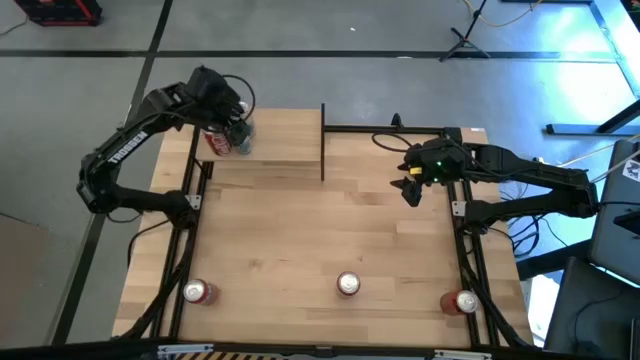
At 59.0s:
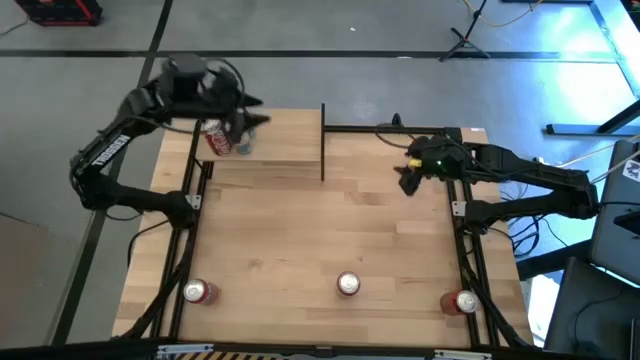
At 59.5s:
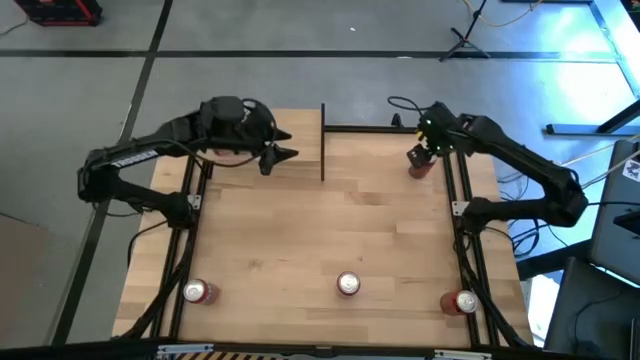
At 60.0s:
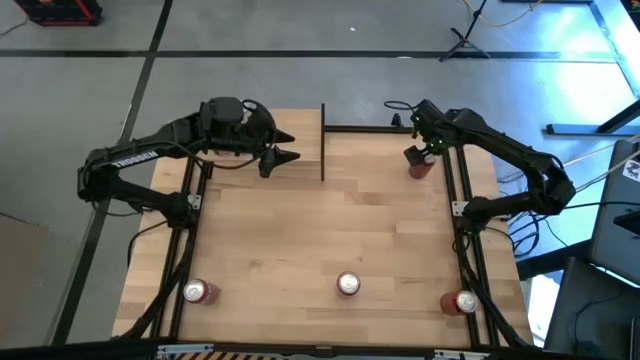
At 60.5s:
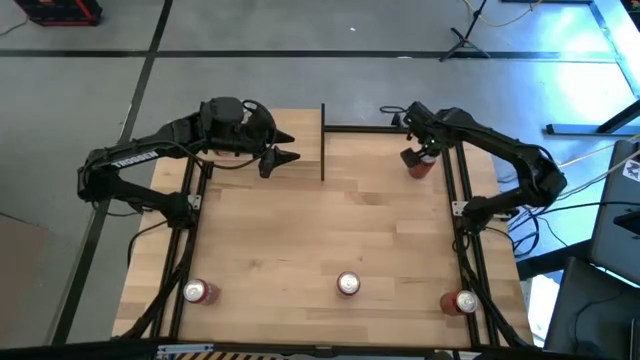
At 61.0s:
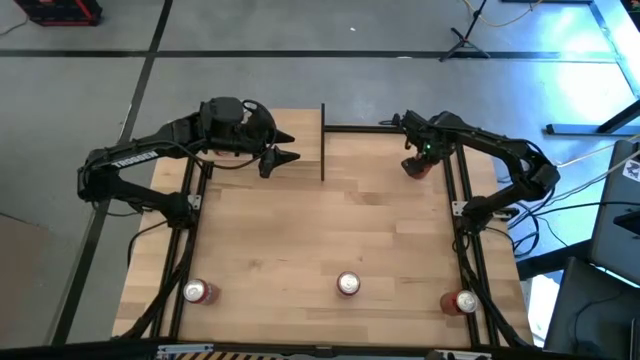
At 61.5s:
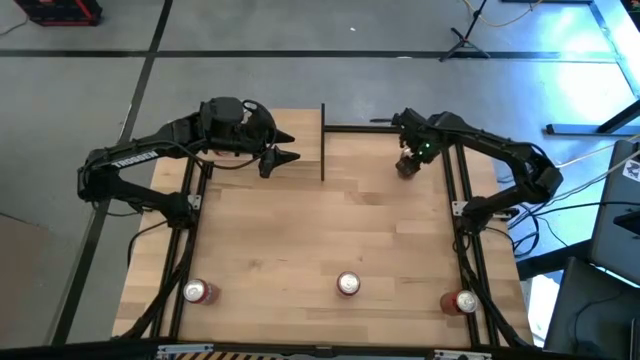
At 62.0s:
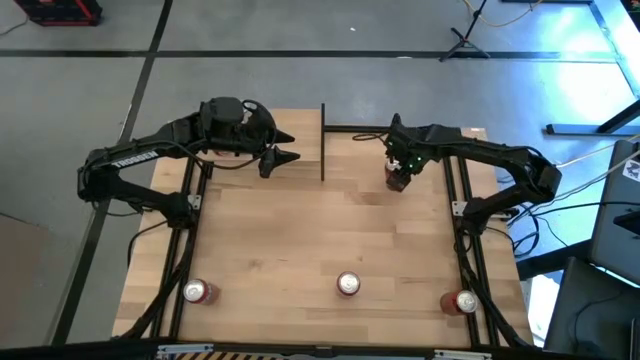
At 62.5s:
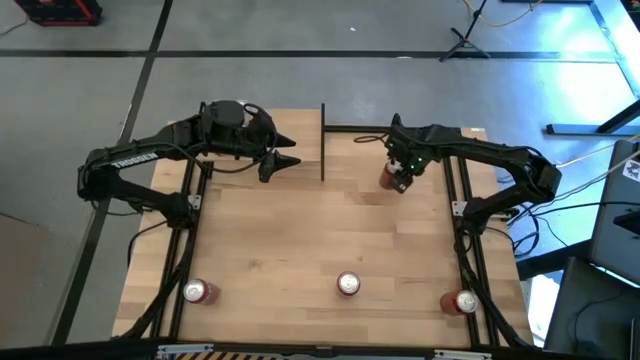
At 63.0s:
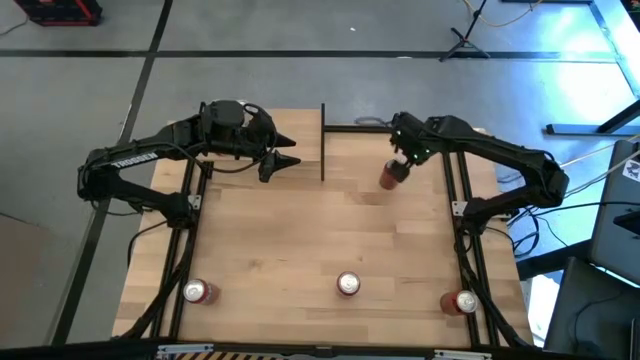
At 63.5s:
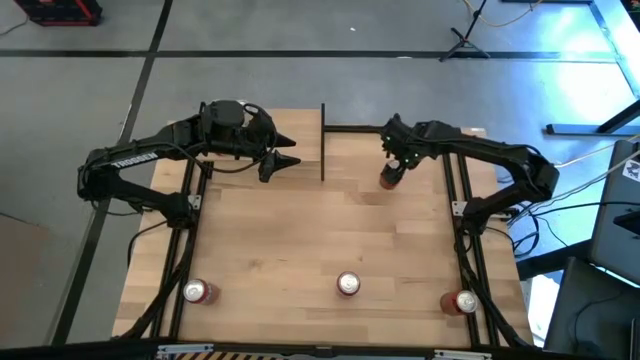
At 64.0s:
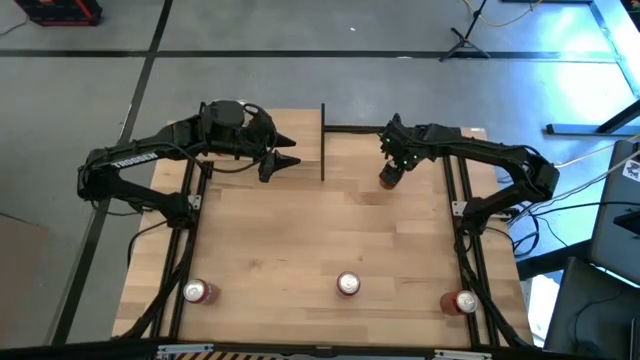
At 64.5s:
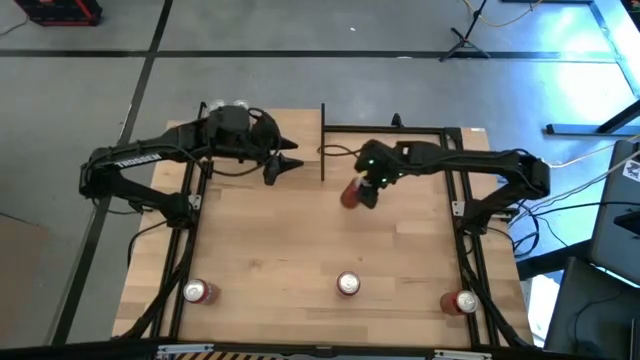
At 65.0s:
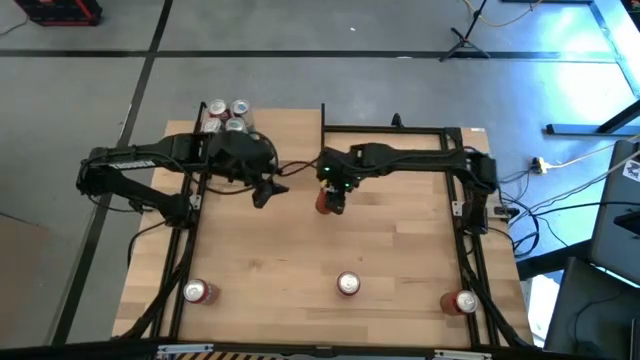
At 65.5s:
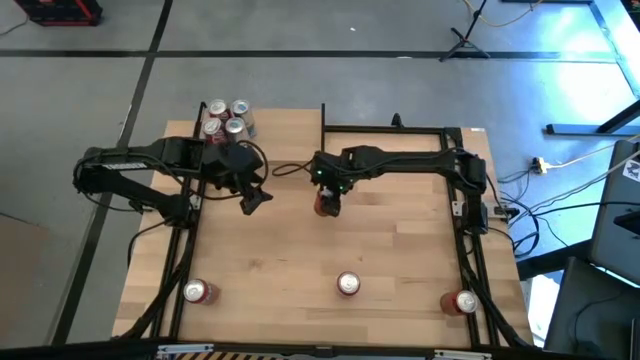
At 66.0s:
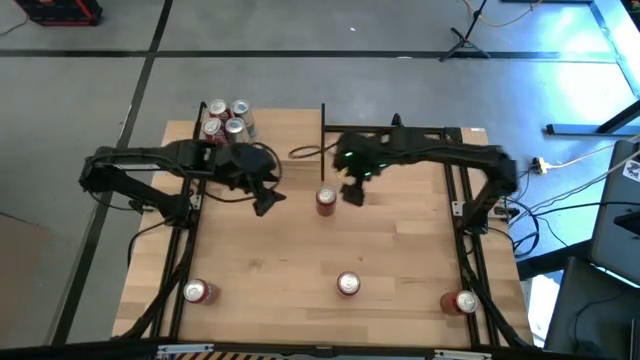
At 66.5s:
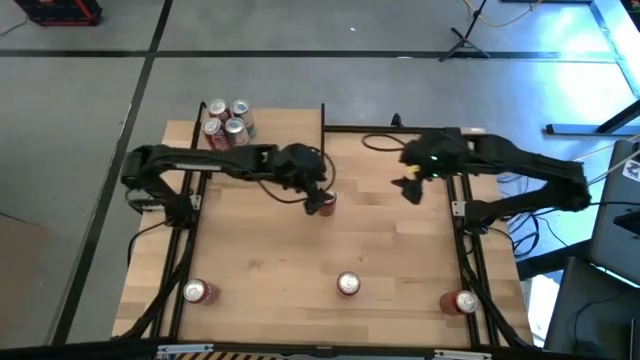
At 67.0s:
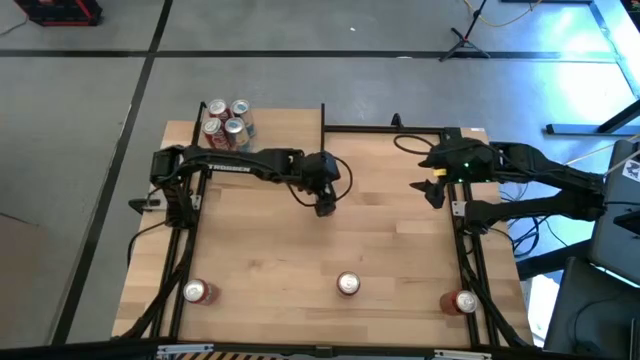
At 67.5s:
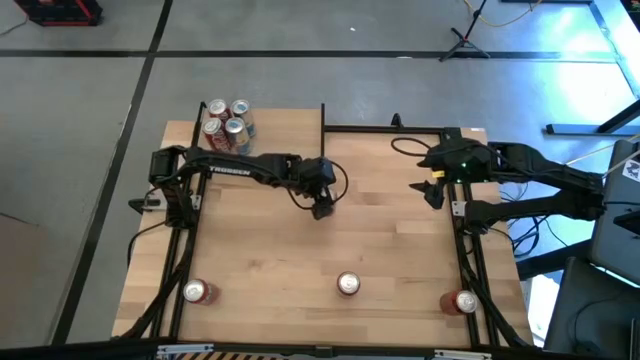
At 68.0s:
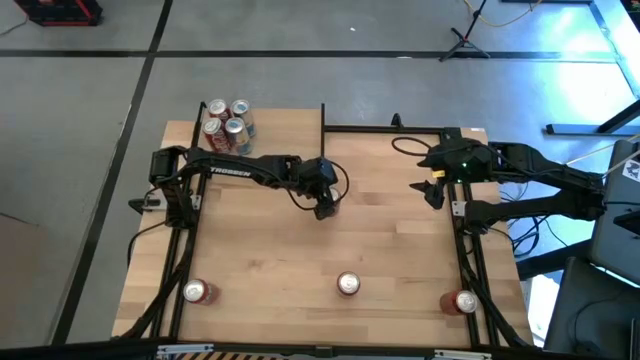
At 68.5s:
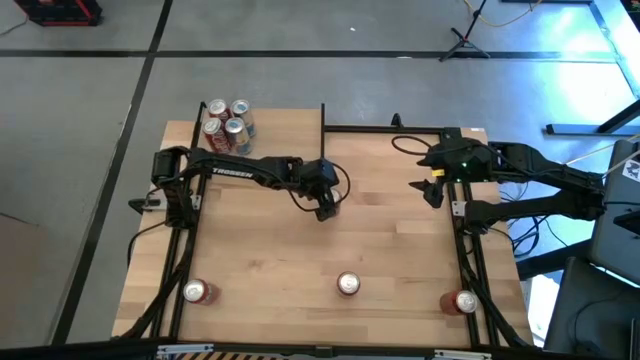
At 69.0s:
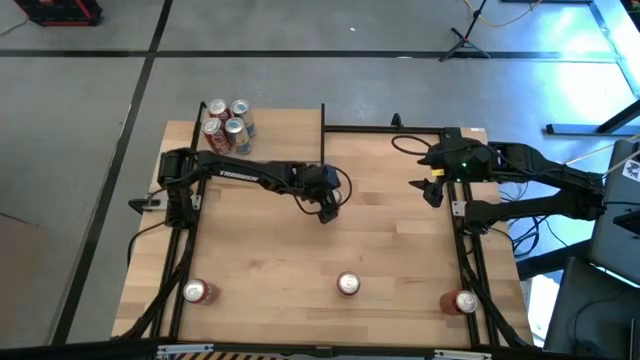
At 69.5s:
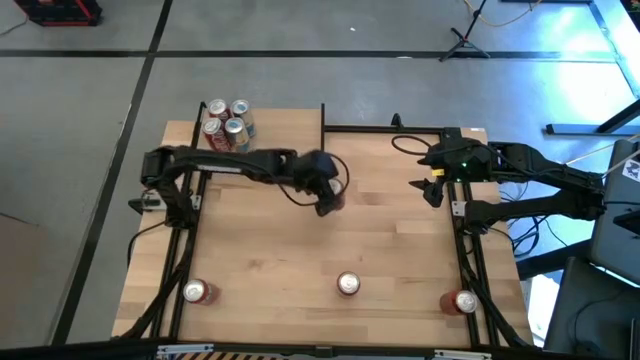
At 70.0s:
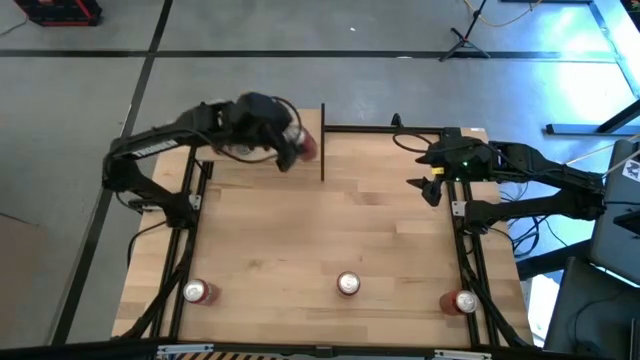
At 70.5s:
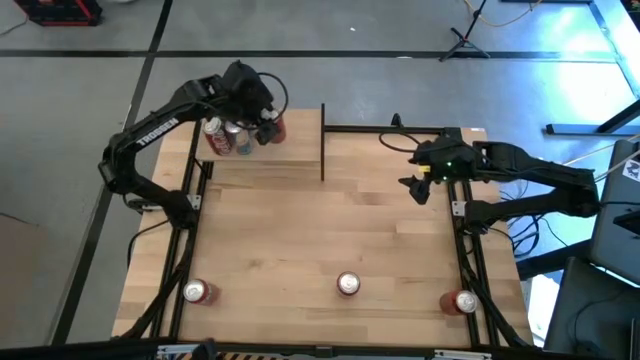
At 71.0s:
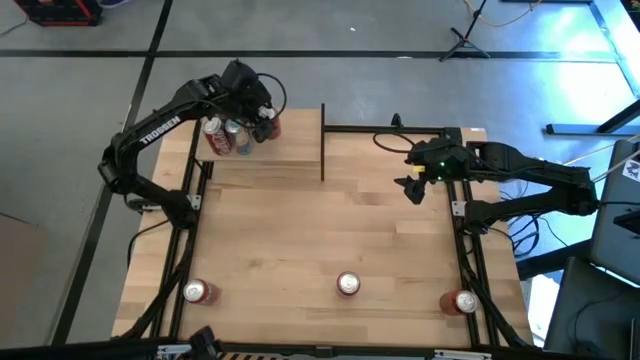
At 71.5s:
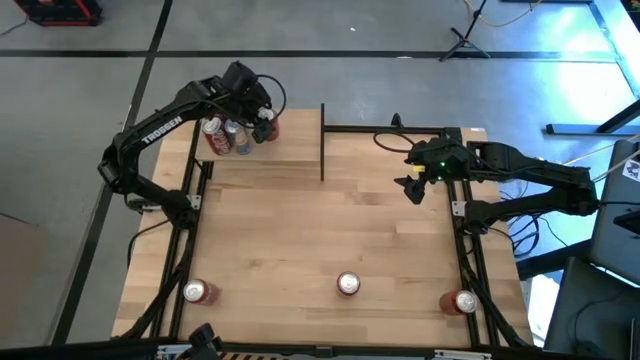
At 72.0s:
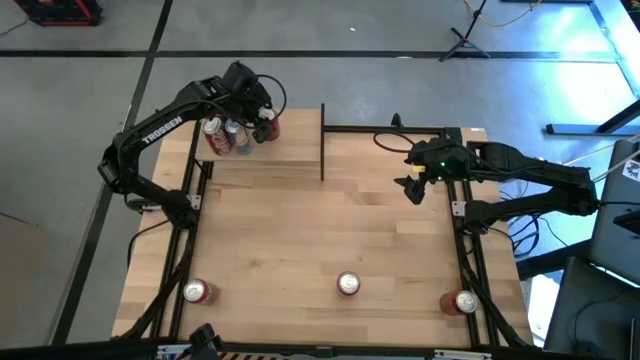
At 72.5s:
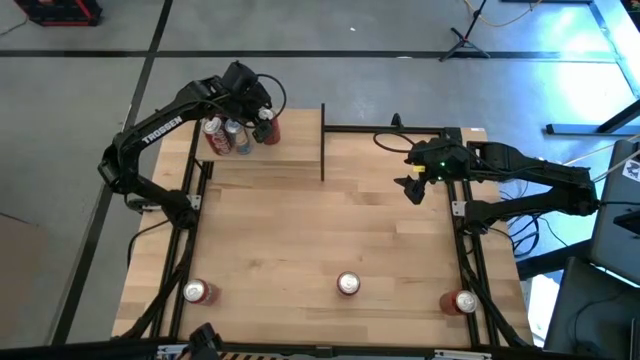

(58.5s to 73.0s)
Task: Place canned beverage on shelf
Put the top red and black soda can on the shelf

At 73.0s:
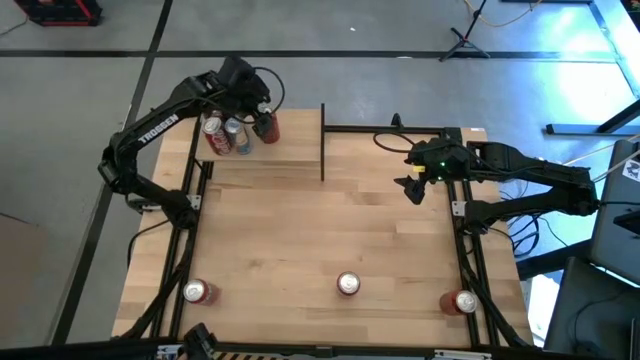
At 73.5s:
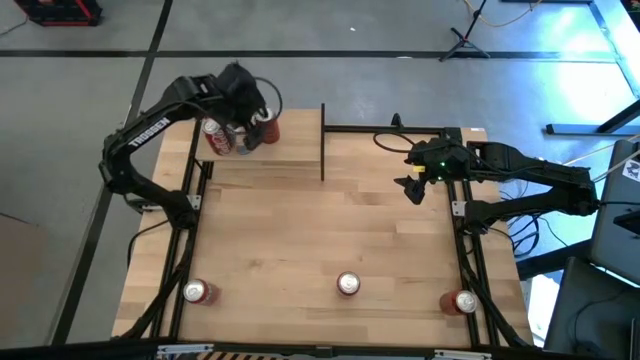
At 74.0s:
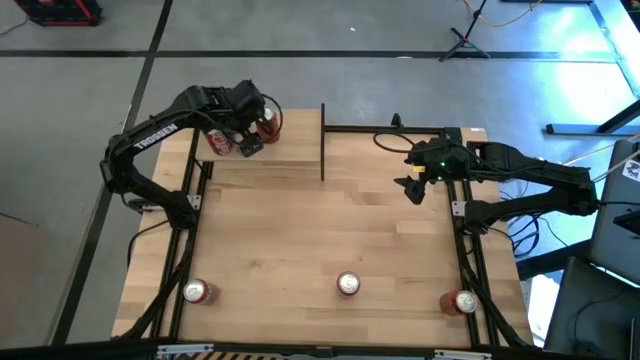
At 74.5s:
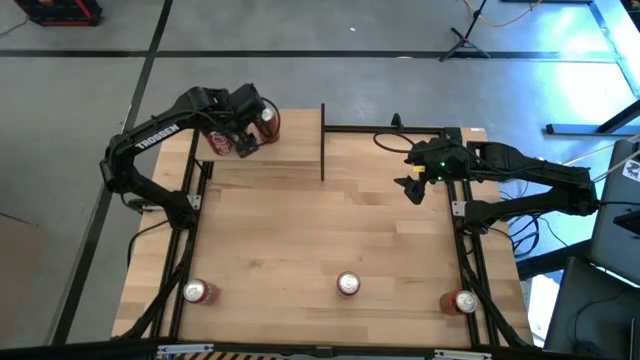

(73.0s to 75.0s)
Adjust the bottom blue soda can

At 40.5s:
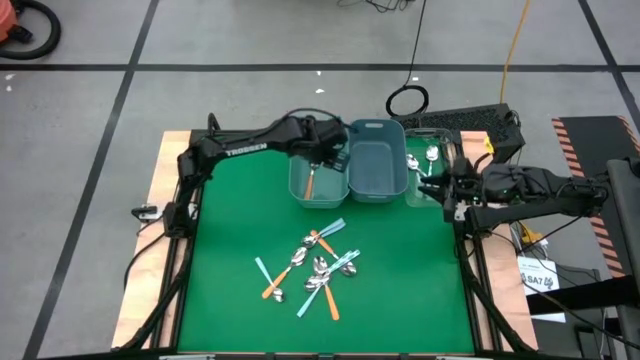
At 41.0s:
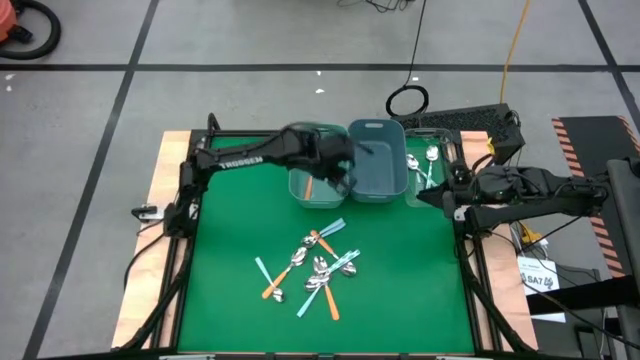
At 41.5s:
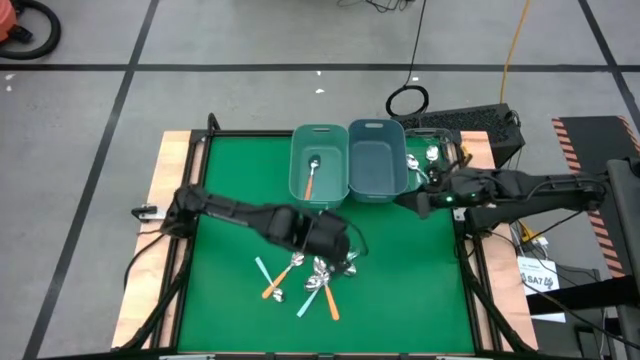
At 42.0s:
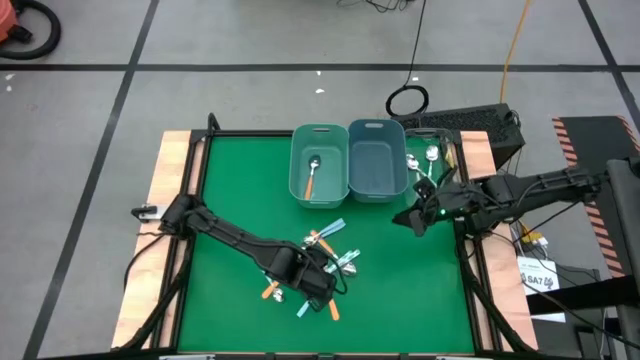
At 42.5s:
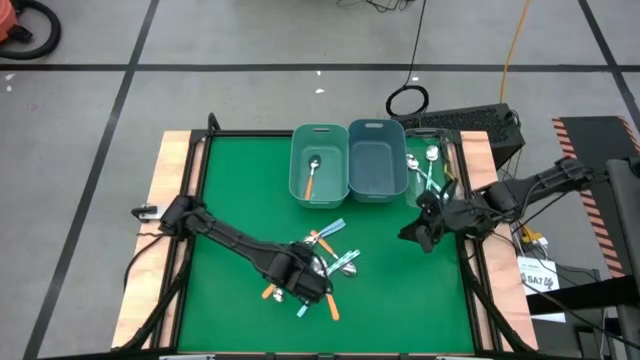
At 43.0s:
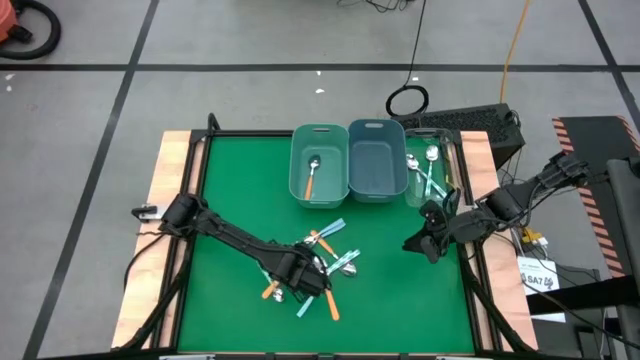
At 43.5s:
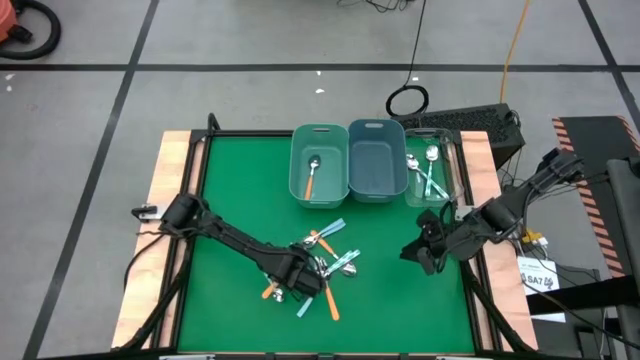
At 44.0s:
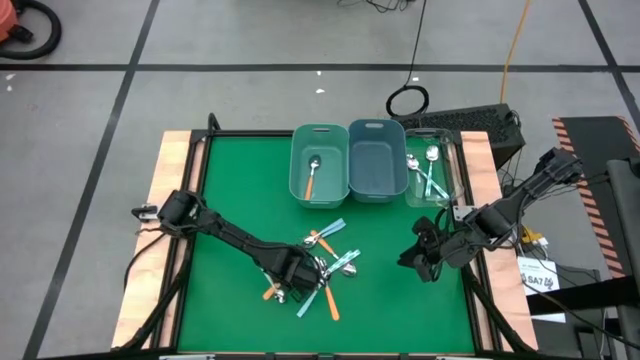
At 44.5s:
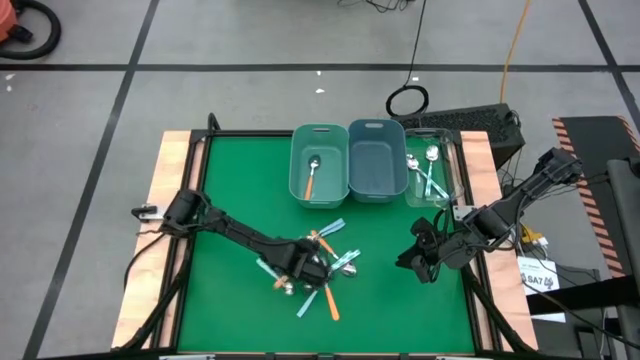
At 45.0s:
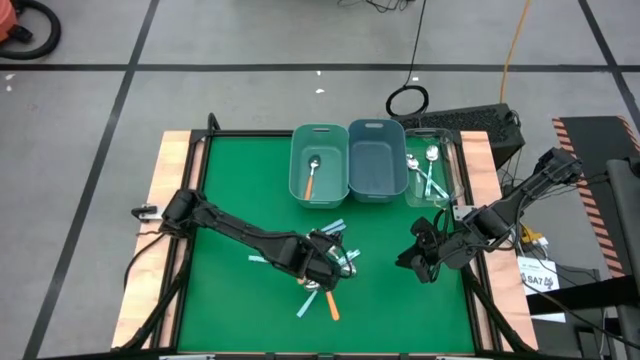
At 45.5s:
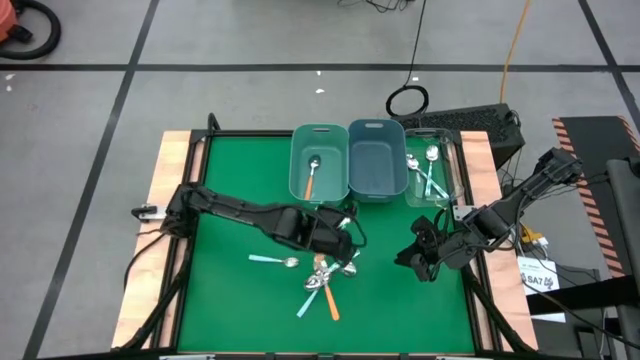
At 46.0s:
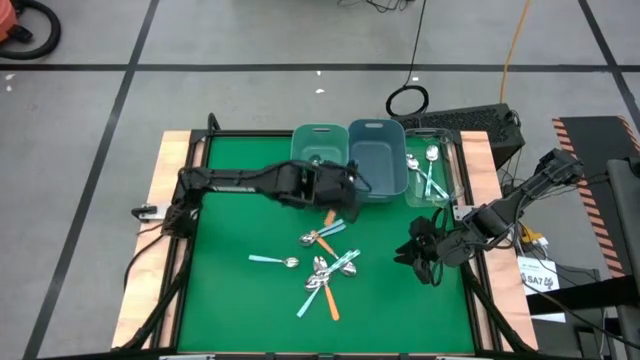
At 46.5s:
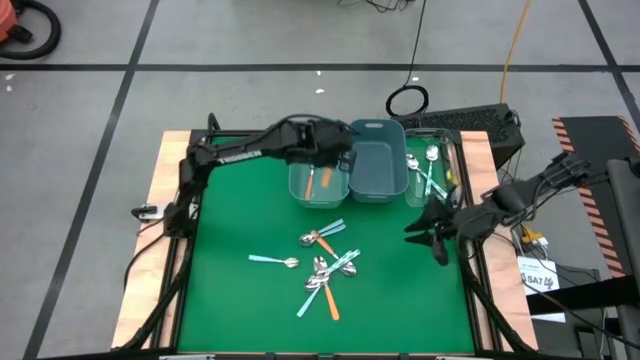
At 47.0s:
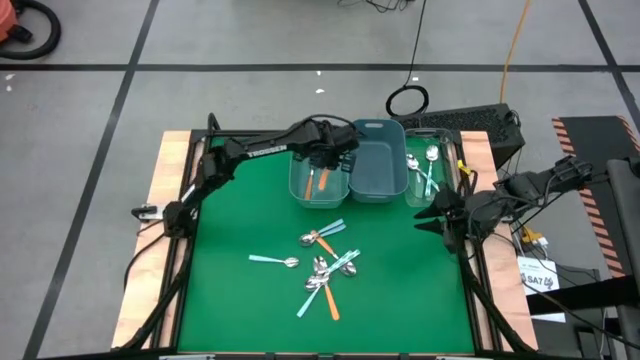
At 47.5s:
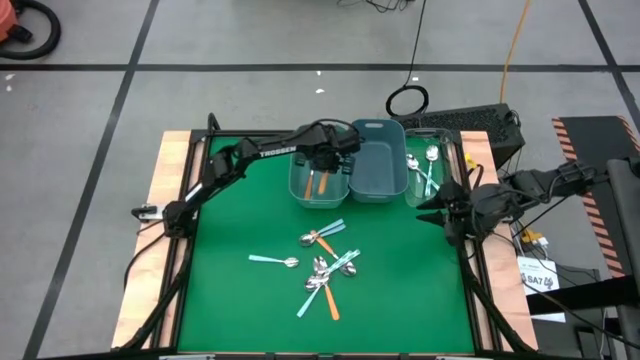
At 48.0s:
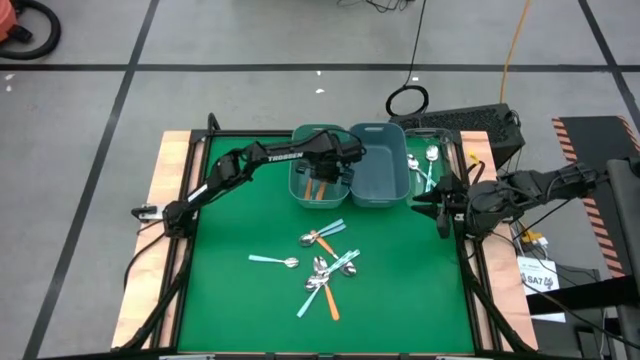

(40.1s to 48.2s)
Task: Sort silverware by color (type)
Put the yellow spoon into the green bin
